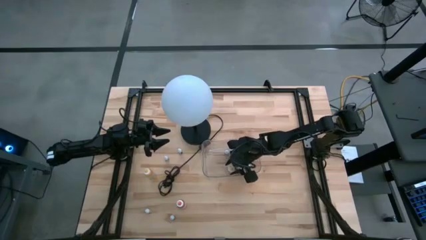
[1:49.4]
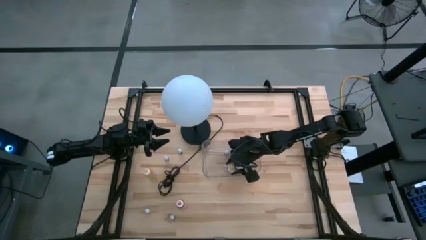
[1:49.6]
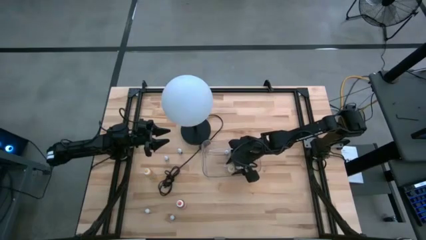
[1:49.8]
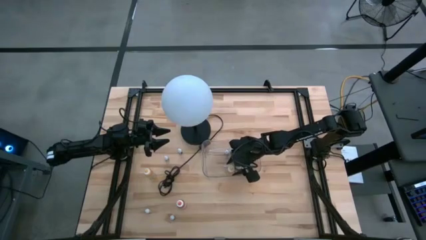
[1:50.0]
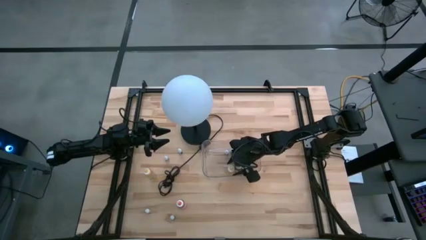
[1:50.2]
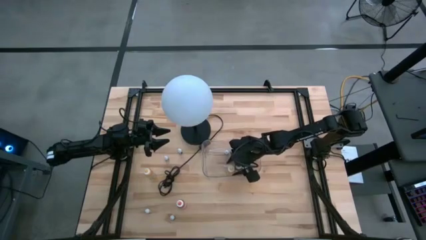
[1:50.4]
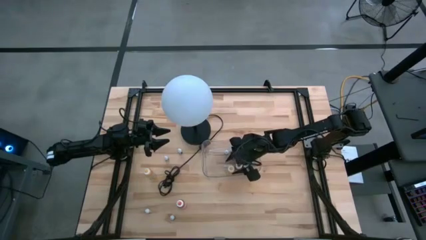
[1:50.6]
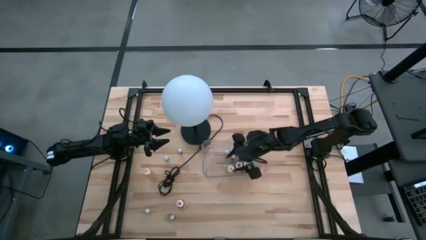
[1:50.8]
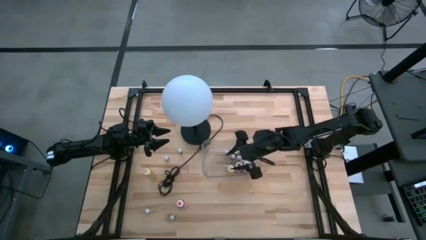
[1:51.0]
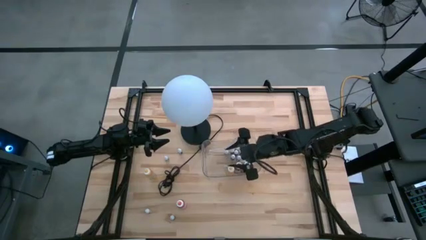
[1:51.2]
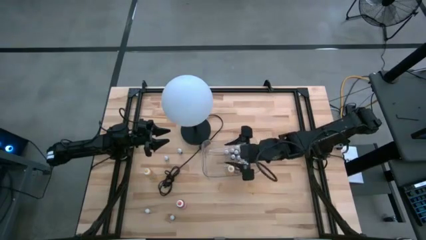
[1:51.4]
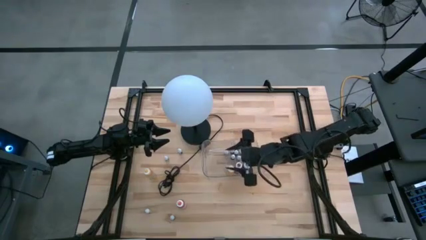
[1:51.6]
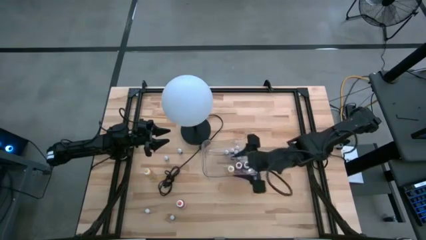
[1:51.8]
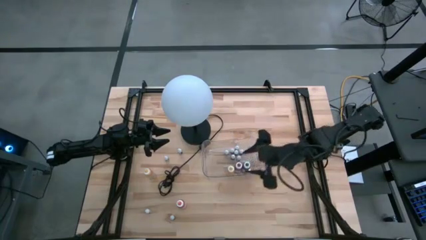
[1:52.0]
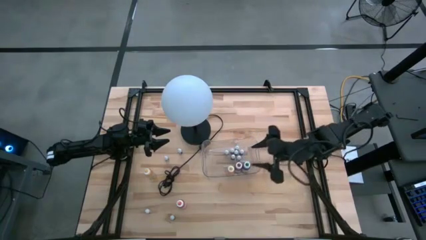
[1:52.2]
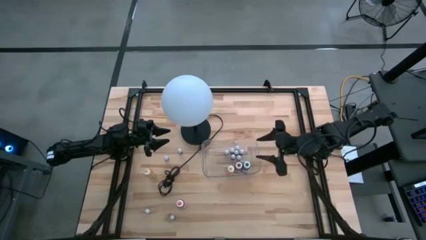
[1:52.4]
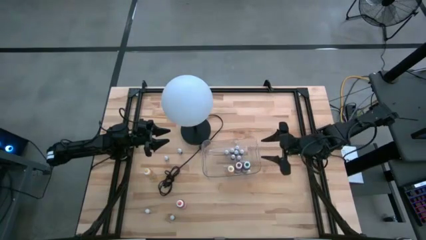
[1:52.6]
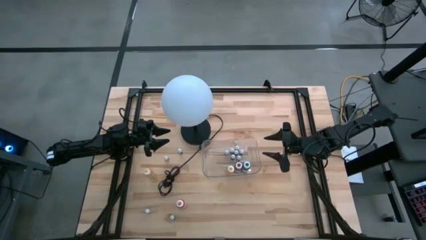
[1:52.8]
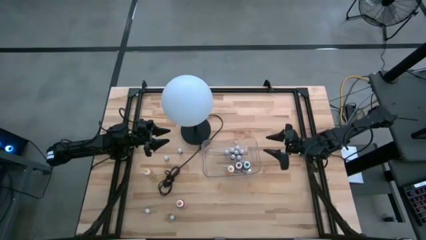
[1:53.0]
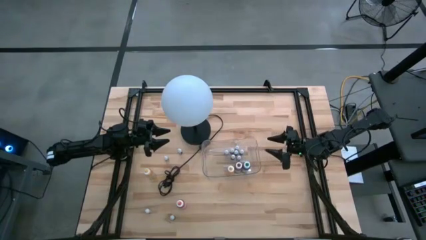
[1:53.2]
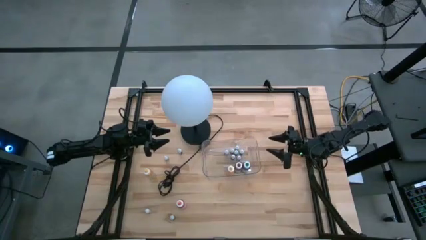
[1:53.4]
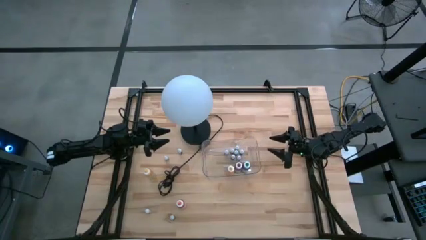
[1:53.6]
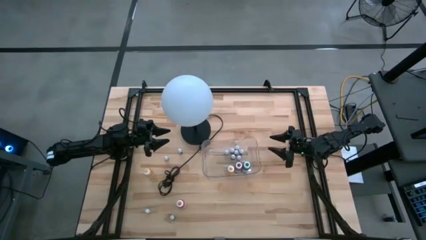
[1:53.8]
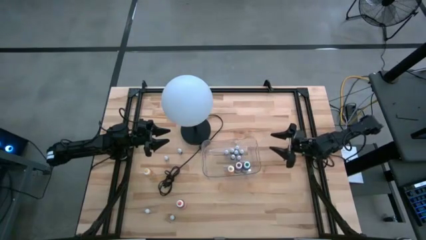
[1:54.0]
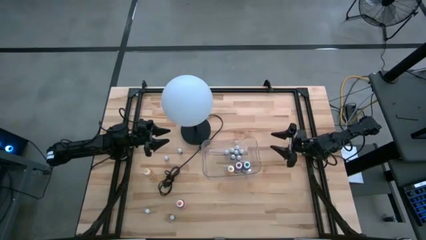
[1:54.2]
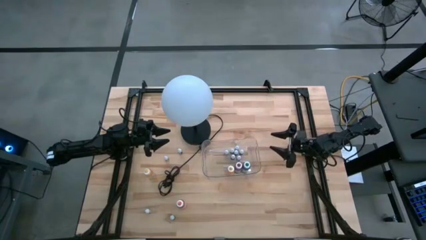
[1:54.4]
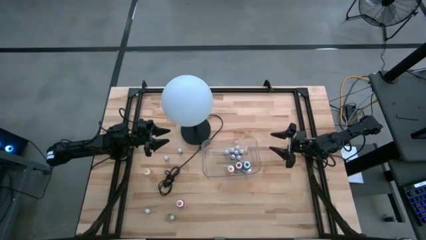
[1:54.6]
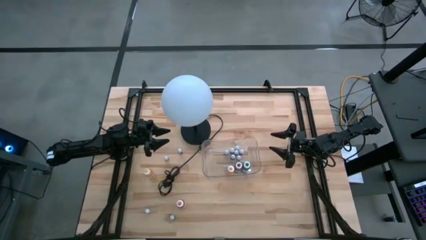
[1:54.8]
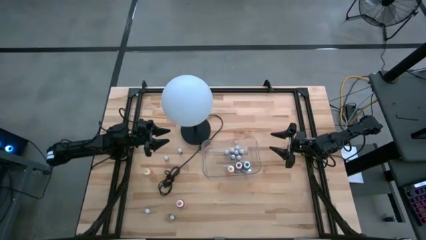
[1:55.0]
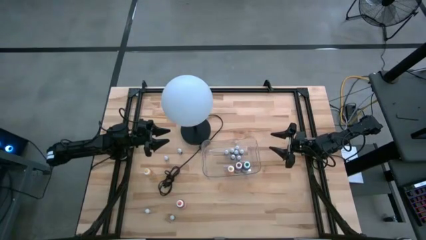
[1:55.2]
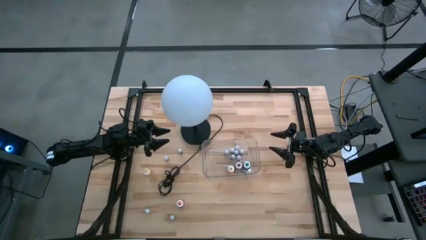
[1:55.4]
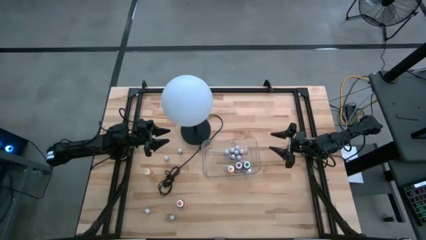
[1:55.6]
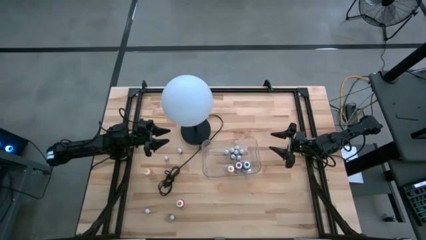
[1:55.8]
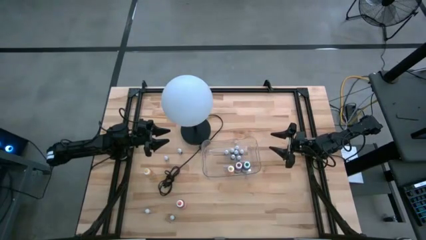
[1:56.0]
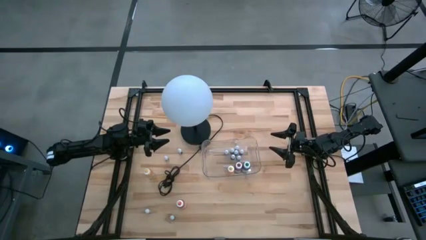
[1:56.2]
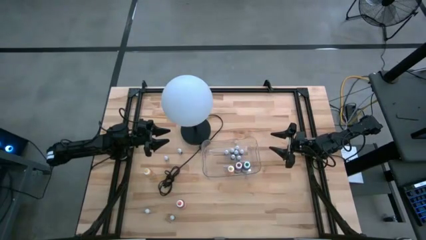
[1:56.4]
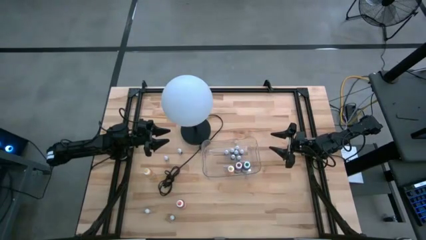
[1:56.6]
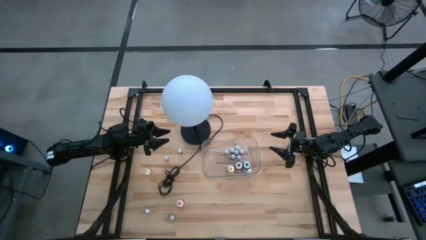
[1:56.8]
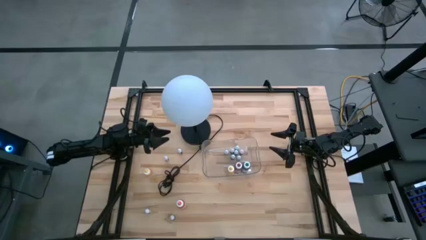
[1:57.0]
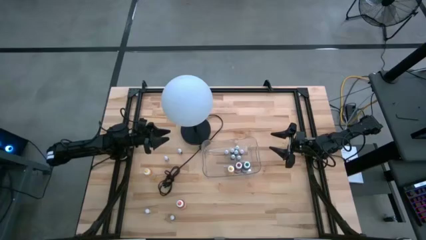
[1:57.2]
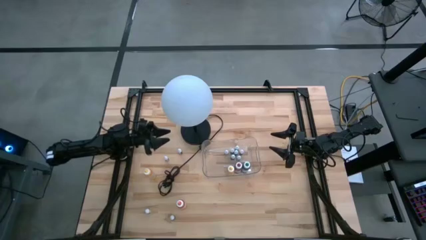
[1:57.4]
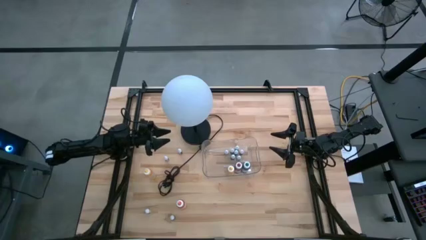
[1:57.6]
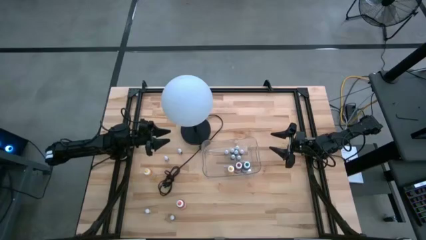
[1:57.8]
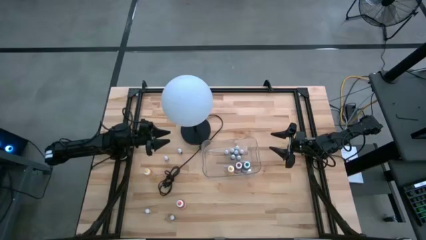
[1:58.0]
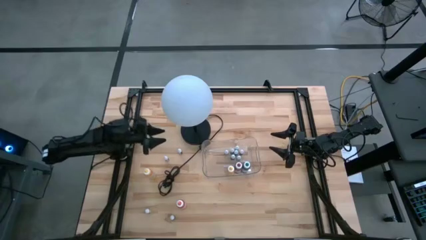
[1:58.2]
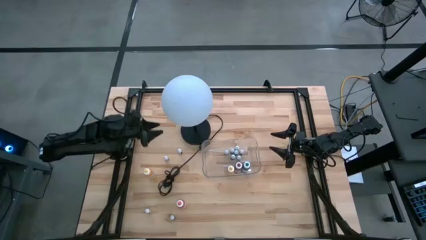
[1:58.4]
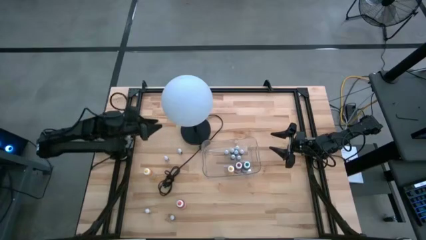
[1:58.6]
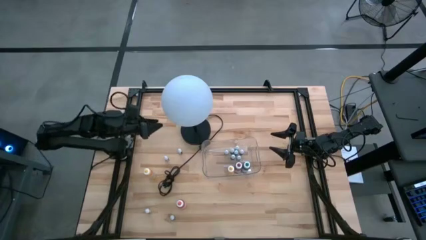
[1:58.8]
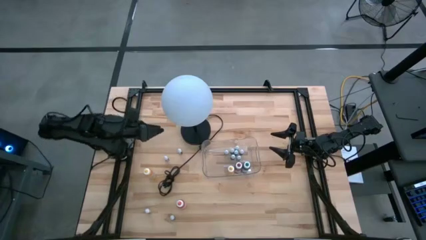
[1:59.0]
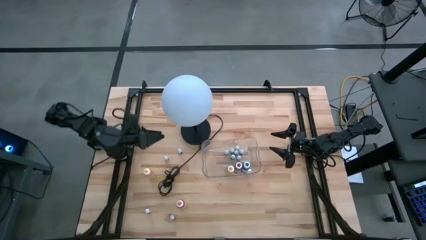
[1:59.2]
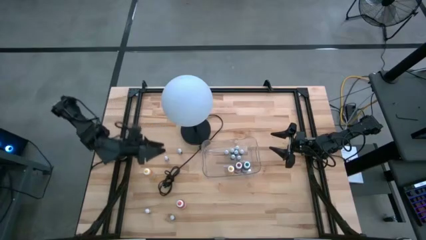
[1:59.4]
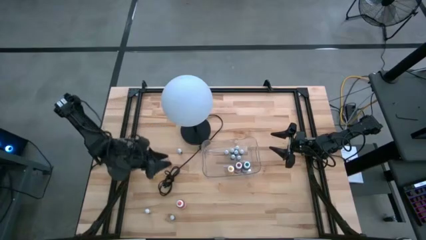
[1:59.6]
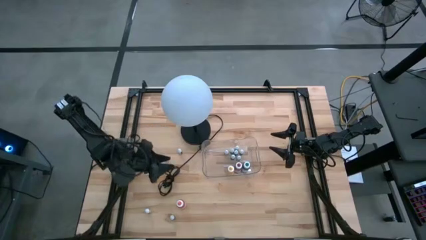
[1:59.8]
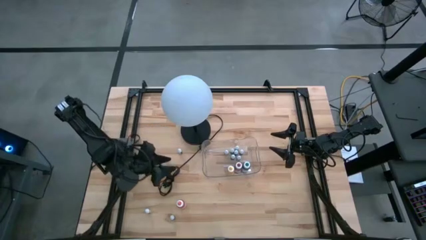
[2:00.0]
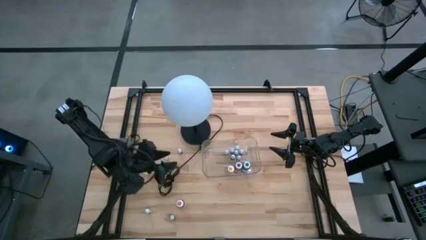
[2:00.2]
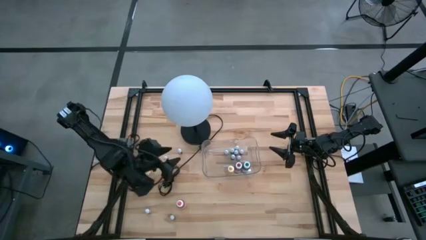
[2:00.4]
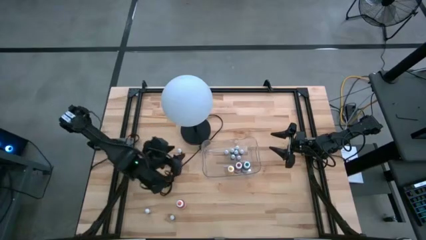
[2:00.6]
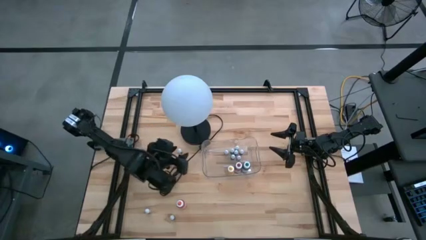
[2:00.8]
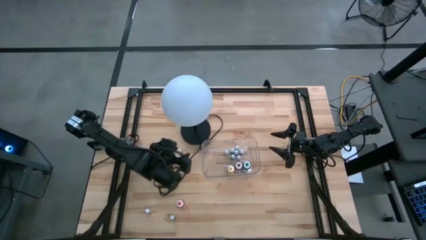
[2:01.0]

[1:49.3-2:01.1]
Task: Pick & Place food coloring
Put the small blue food coloring bottle into the transparent bin
